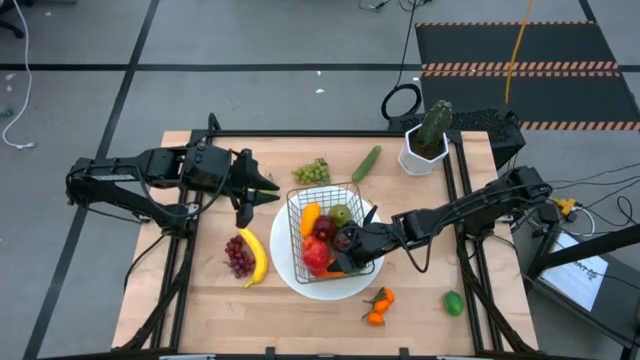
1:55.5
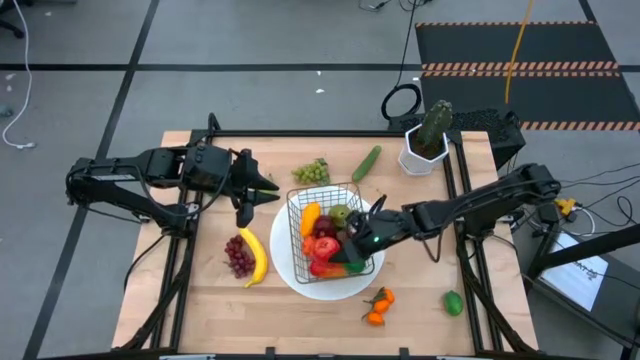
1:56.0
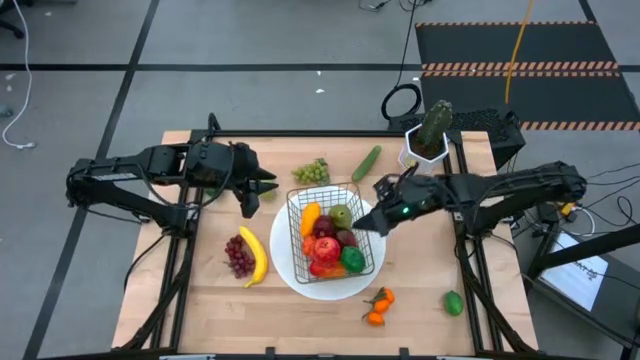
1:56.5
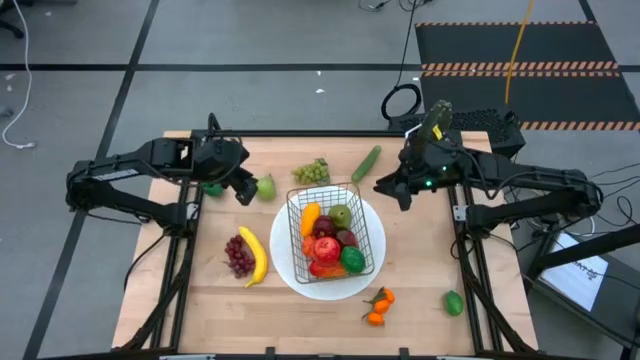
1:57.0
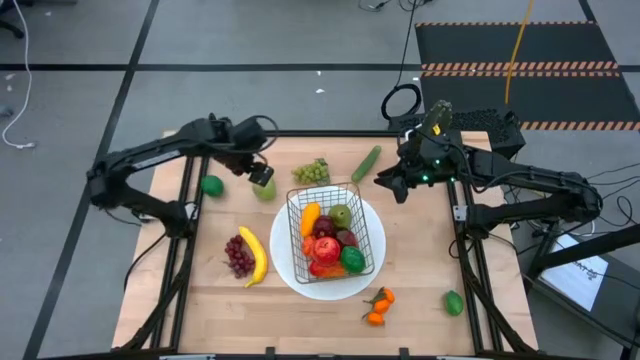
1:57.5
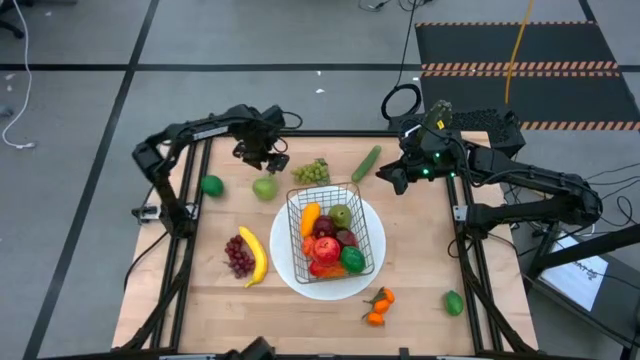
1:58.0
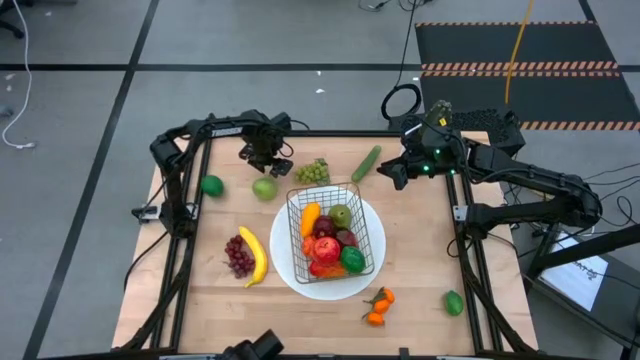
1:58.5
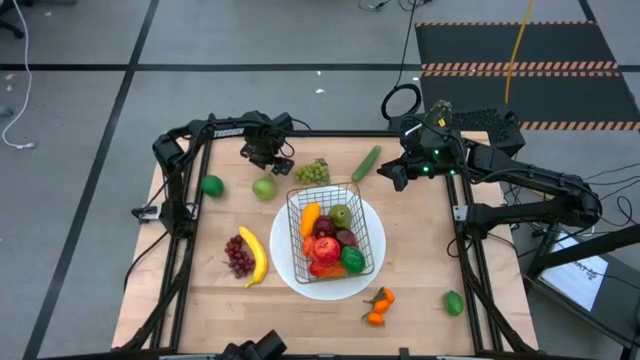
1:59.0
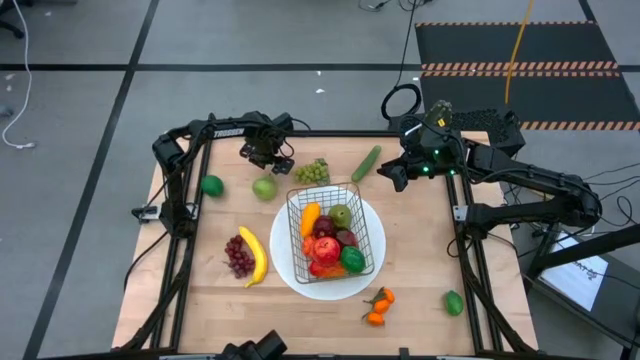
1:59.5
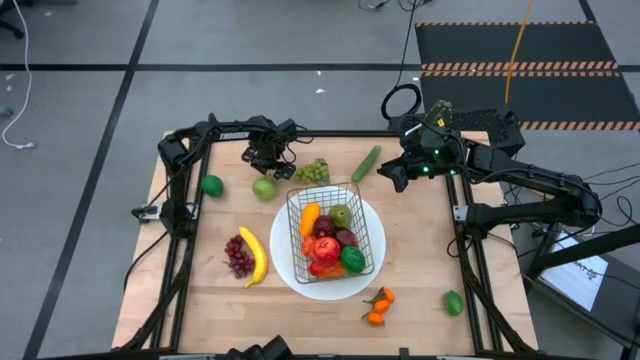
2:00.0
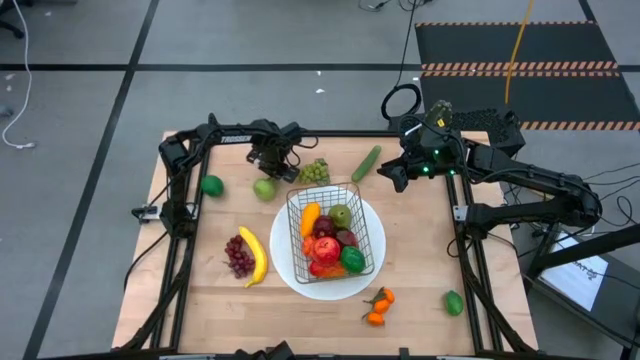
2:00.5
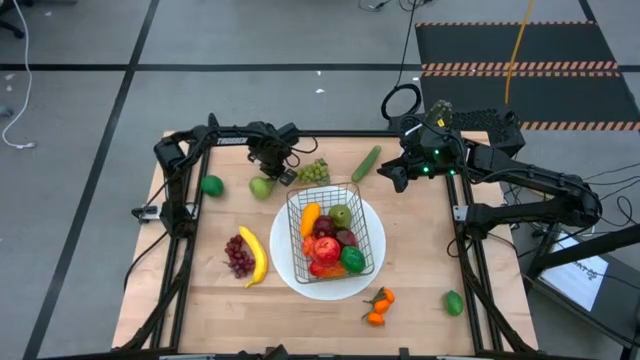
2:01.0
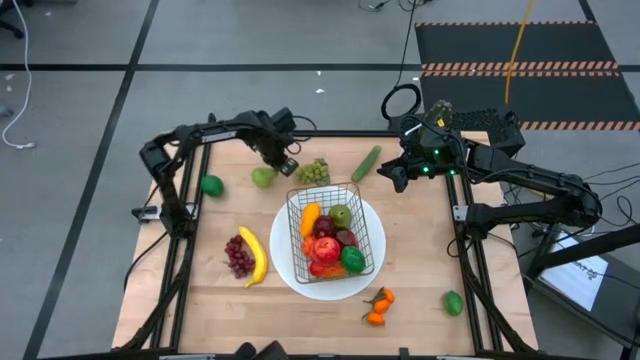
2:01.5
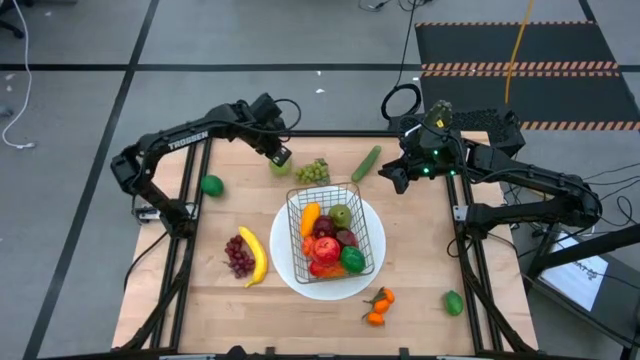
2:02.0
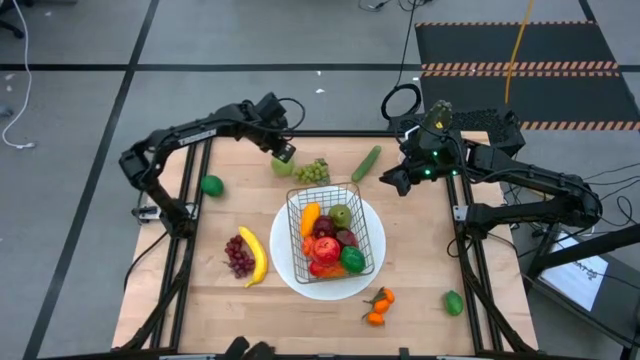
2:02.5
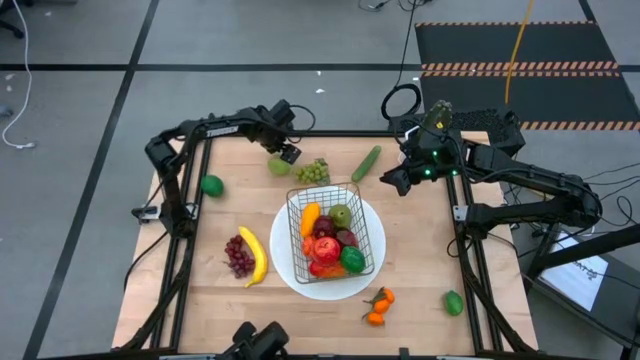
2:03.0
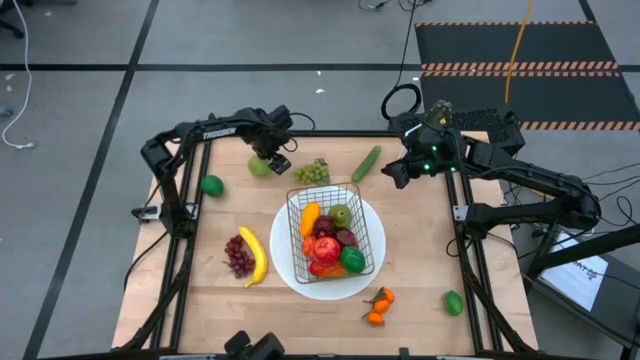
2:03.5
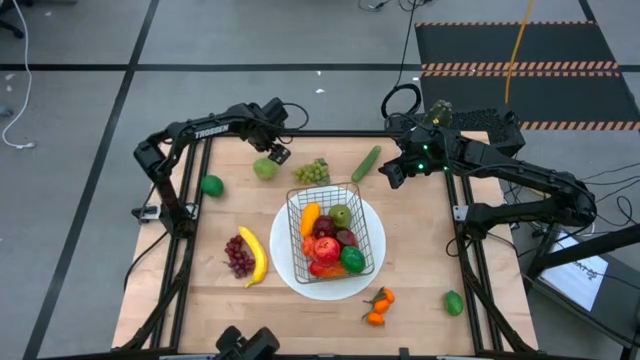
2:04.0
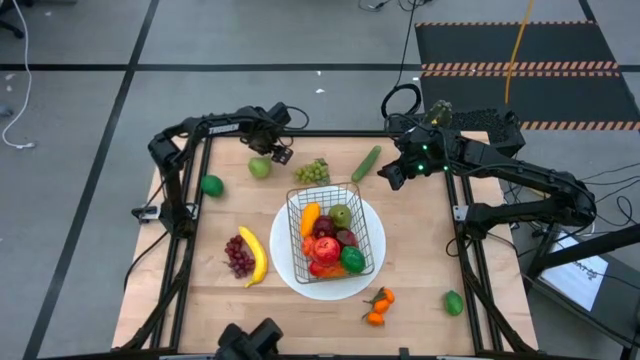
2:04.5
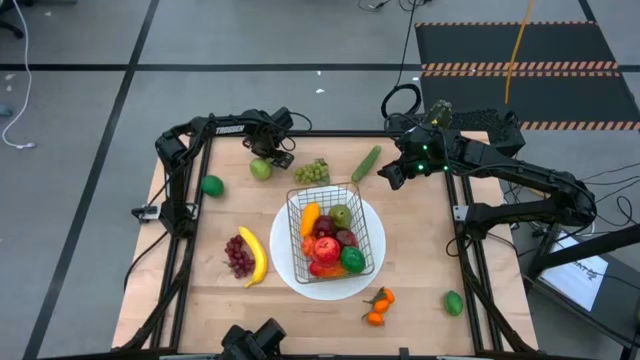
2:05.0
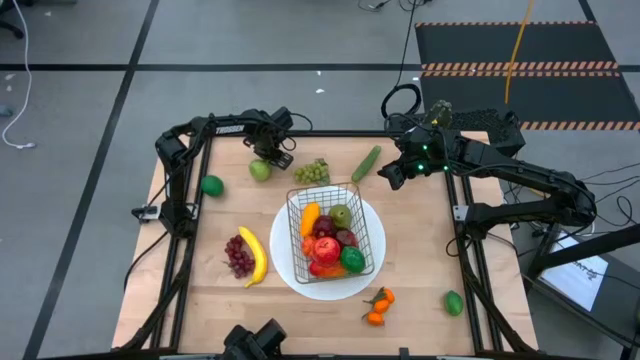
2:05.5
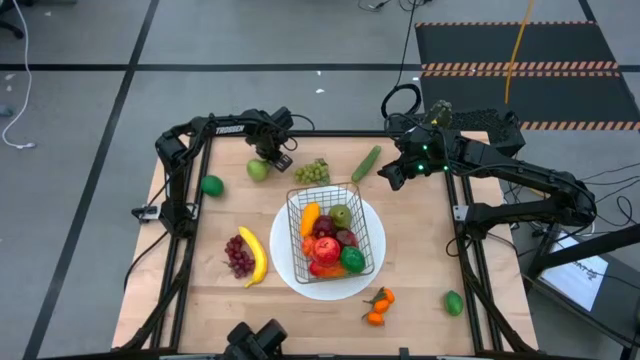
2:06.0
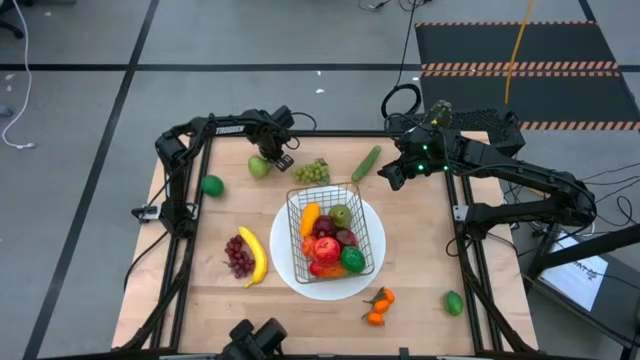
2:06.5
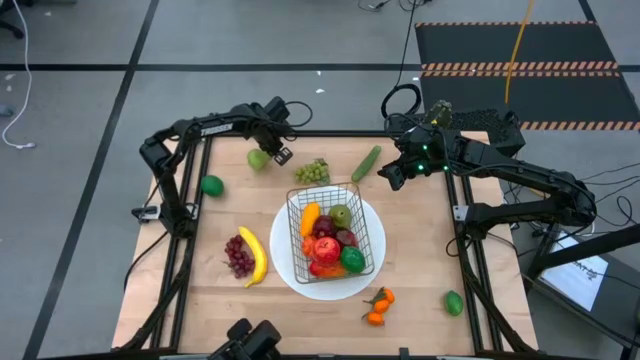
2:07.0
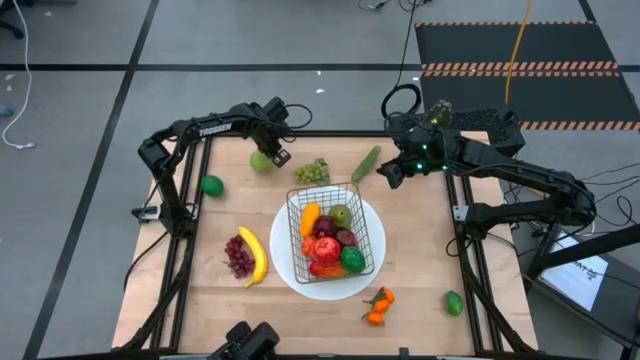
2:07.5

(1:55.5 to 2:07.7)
Task: Build produce basket
Put the green pear into the black wire basket

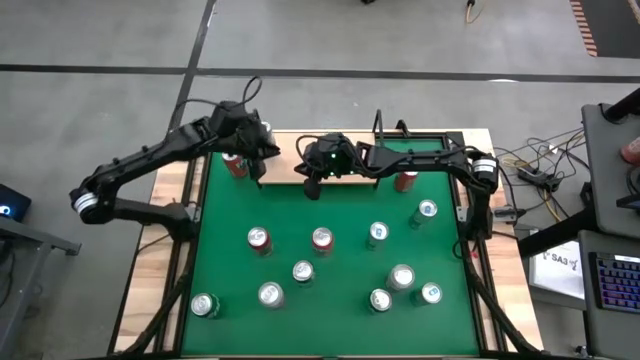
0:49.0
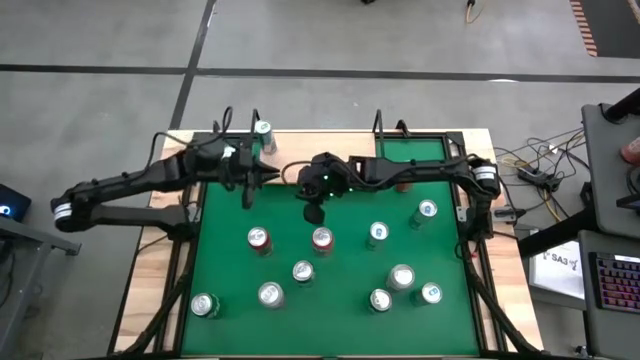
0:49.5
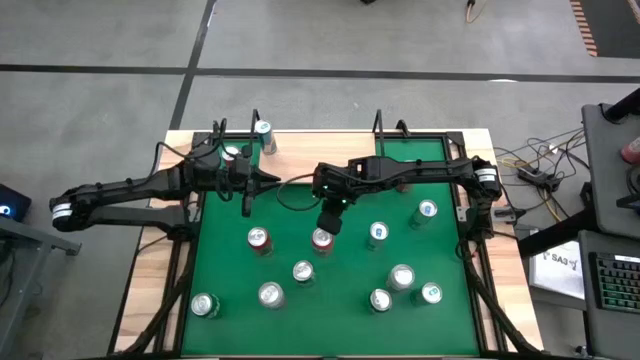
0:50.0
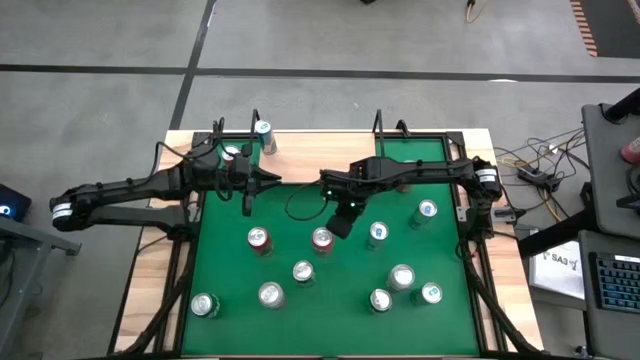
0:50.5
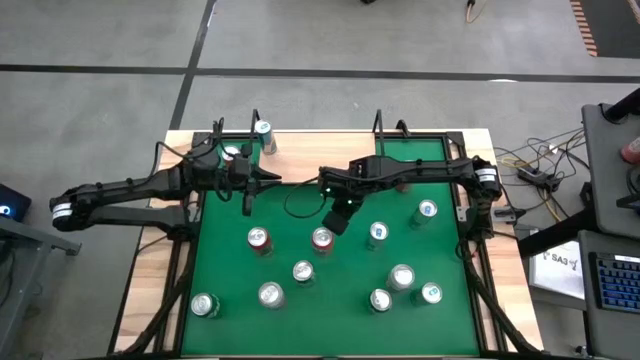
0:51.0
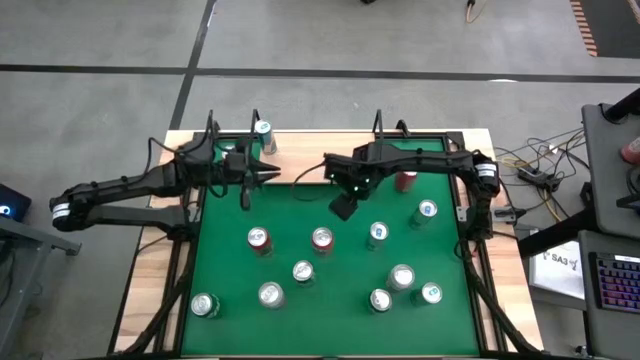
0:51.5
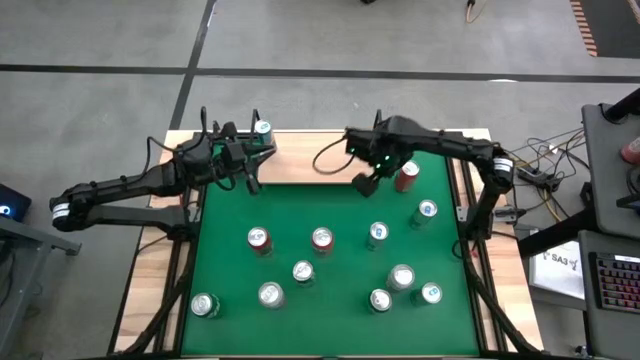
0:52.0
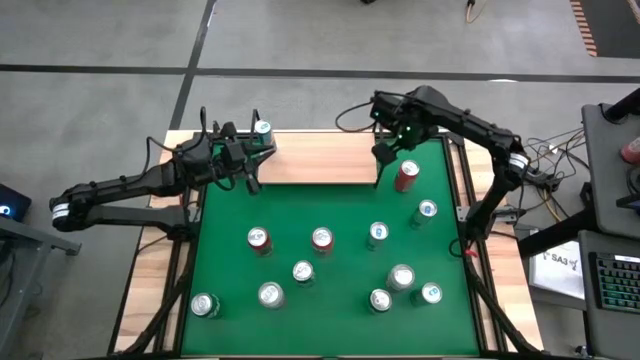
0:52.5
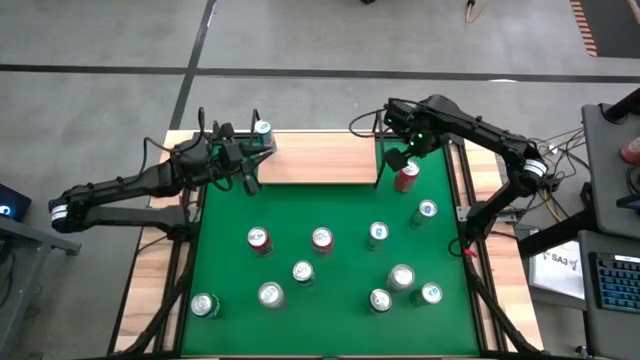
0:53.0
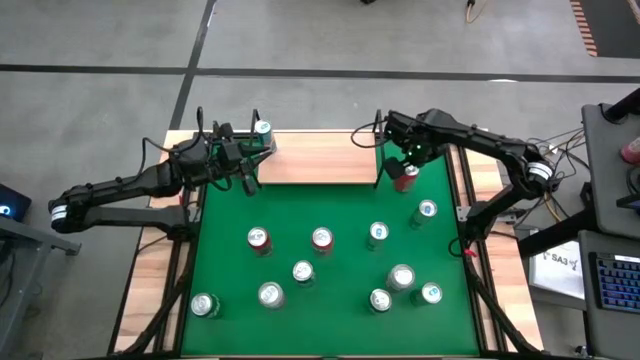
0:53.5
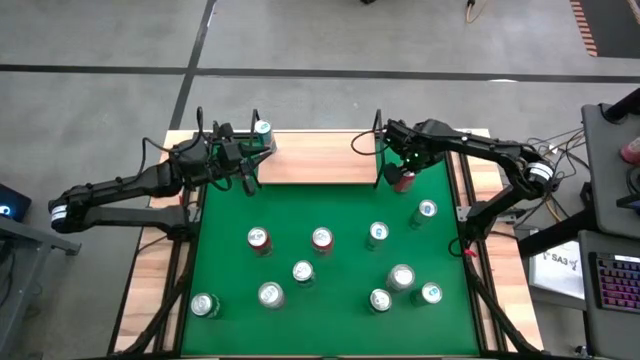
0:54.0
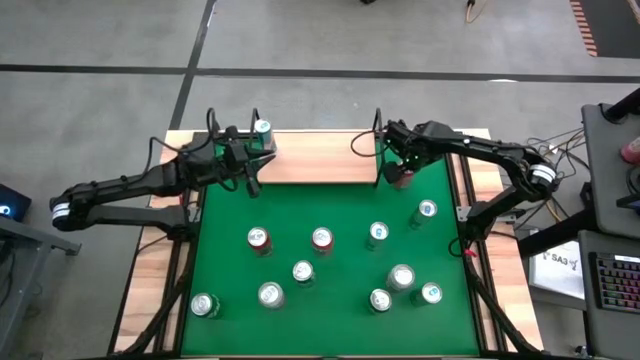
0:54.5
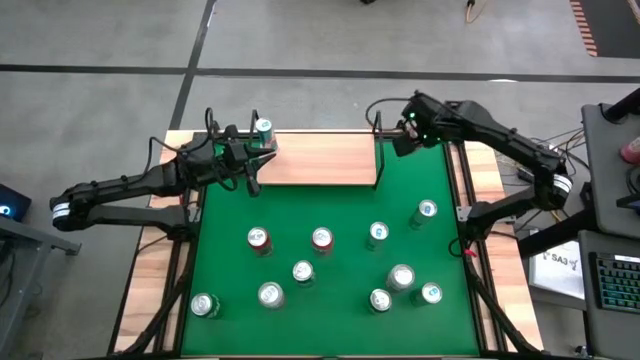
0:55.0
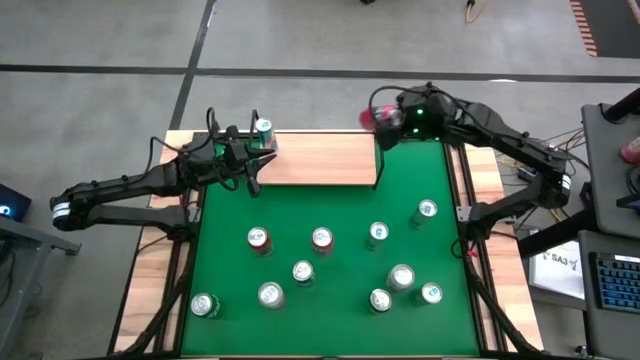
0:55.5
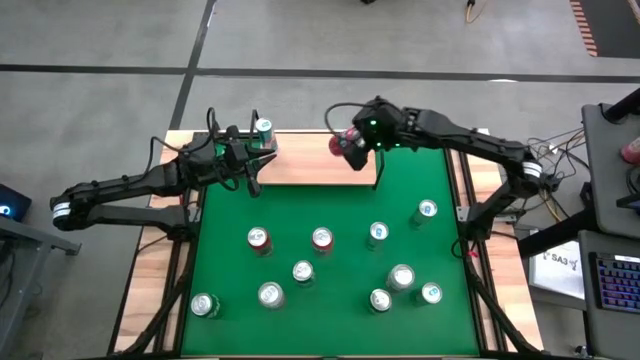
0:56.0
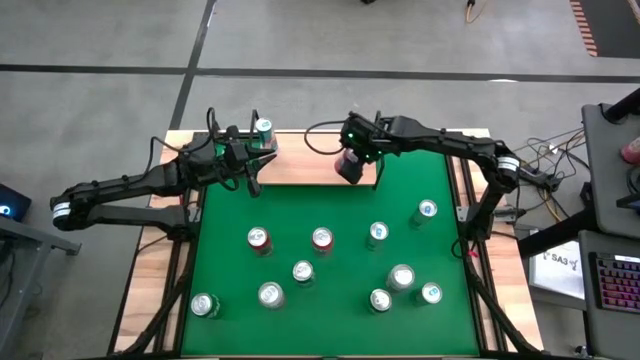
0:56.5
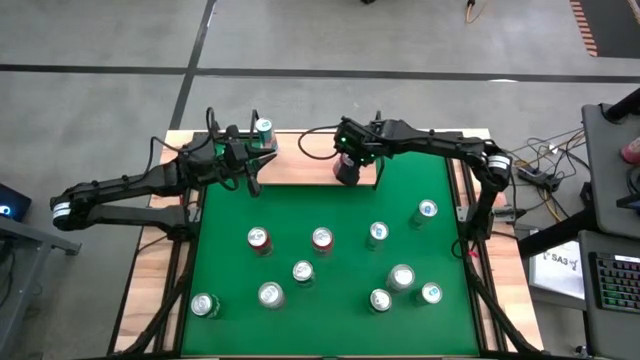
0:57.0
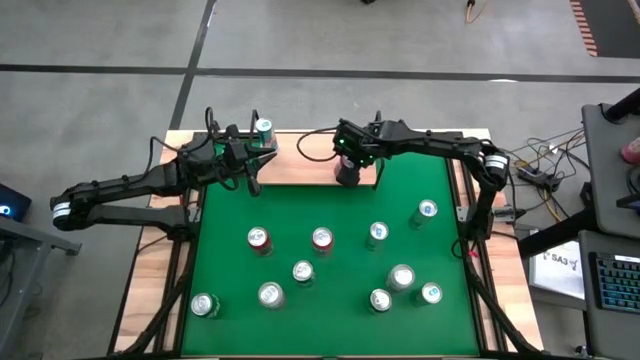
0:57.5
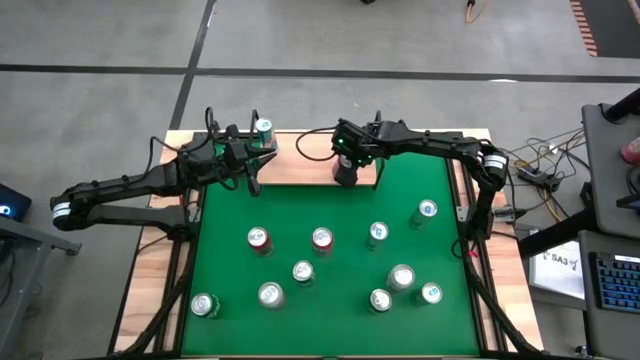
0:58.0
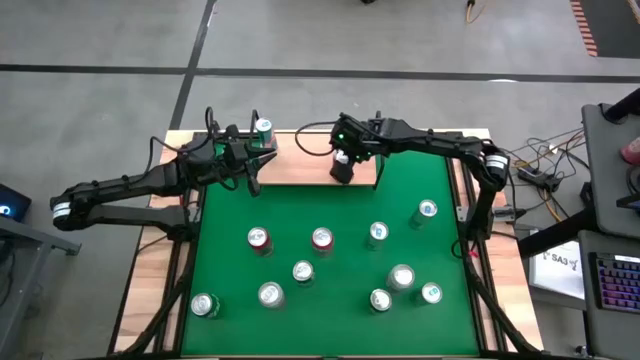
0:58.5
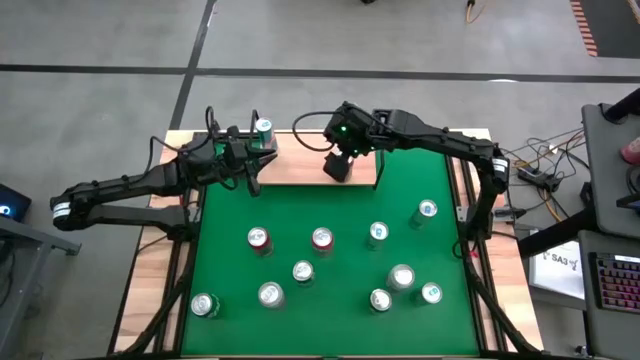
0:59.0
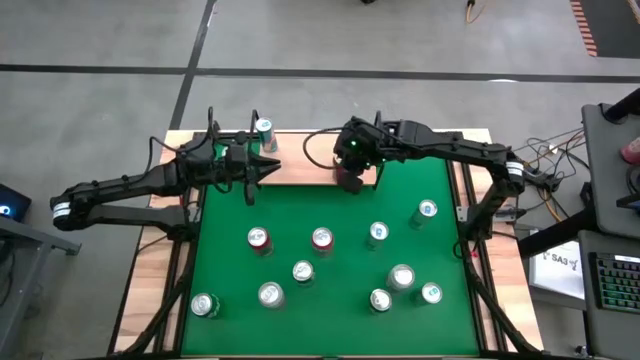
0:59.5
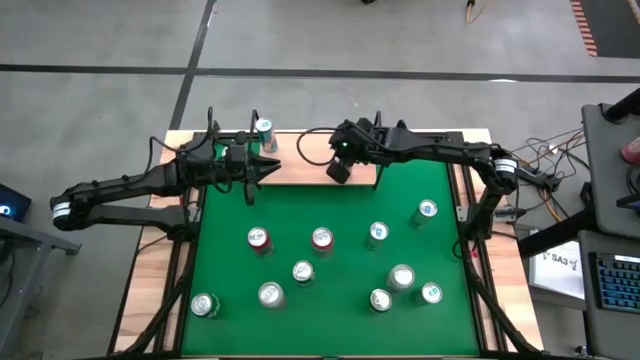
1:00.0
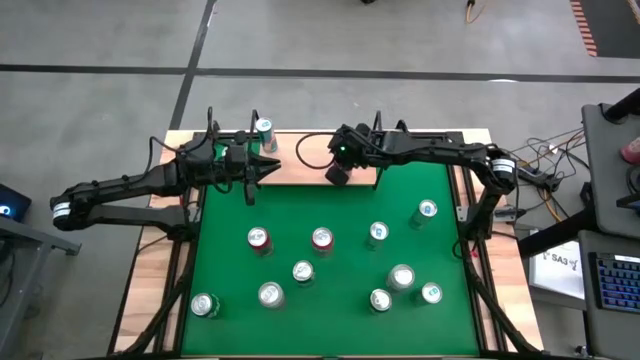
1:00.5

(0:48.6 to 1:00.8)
Task: Pick and place cans onto a shelf
Put the top right orange soda can on the shelf
